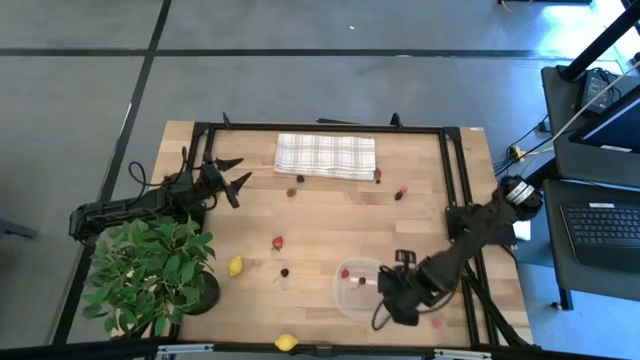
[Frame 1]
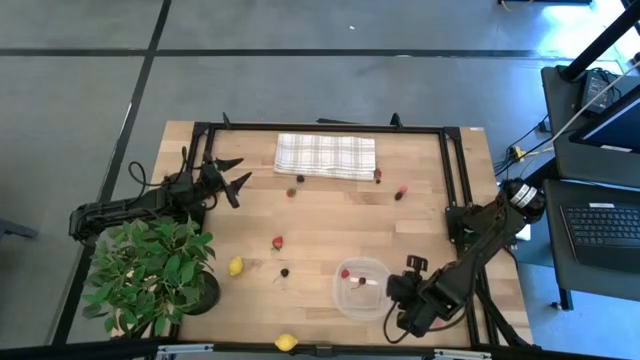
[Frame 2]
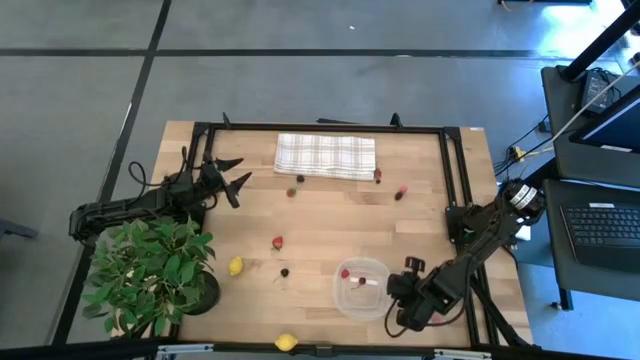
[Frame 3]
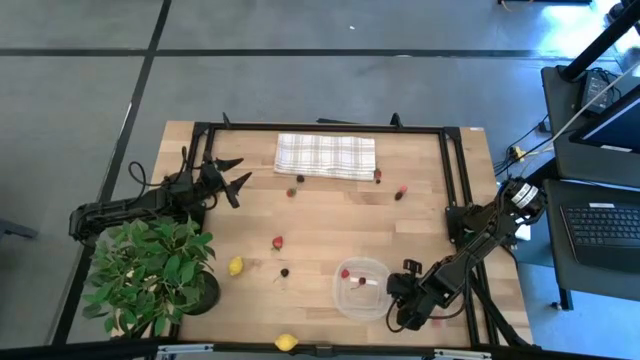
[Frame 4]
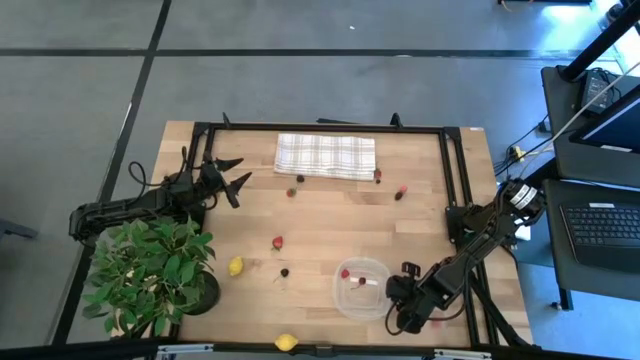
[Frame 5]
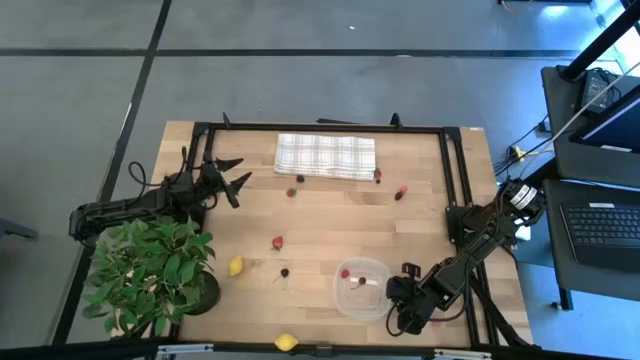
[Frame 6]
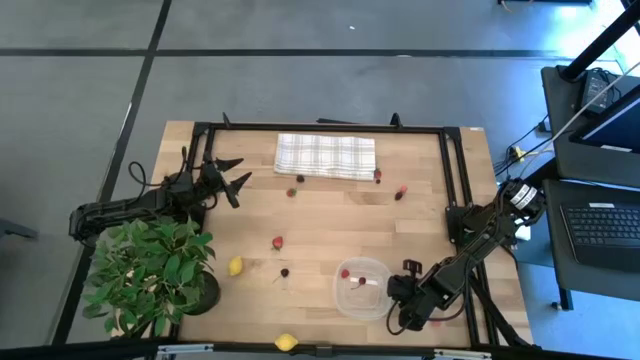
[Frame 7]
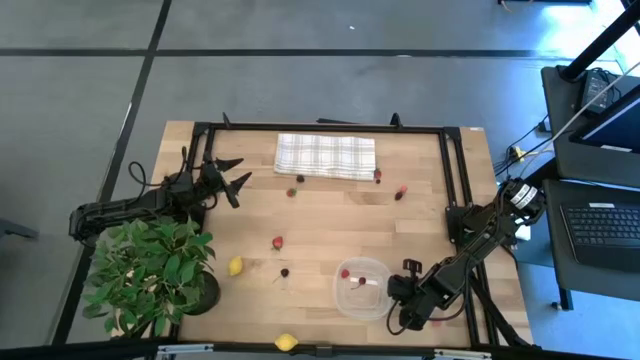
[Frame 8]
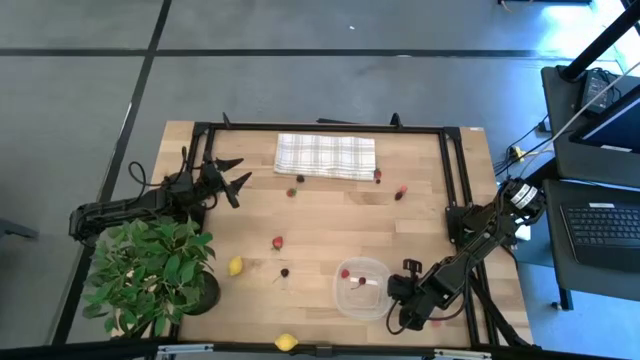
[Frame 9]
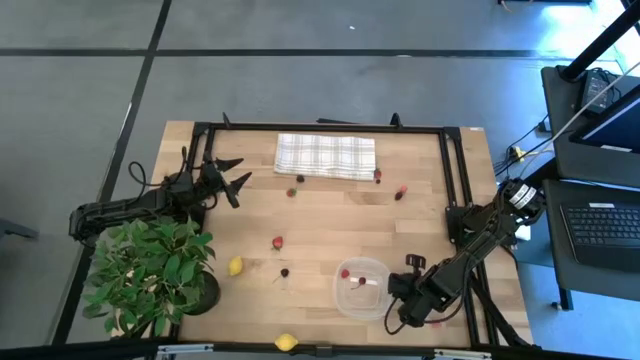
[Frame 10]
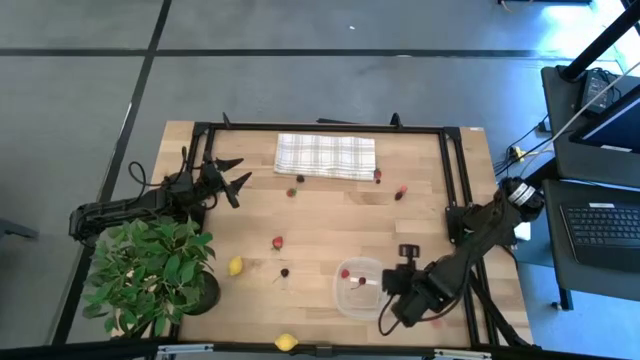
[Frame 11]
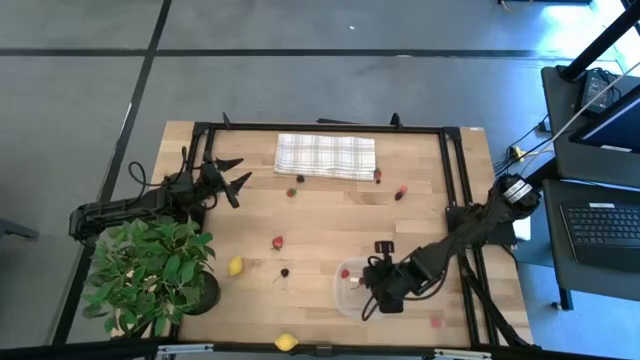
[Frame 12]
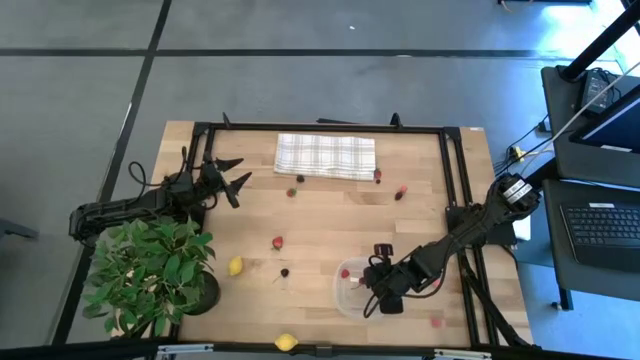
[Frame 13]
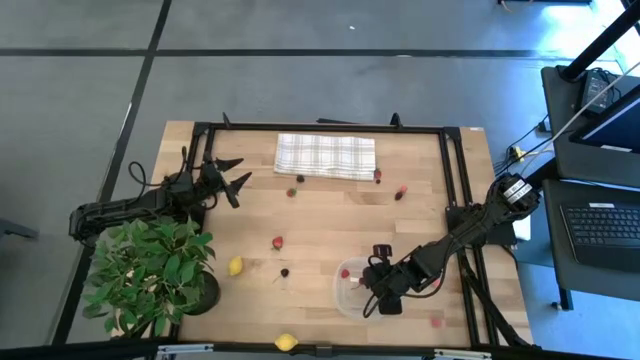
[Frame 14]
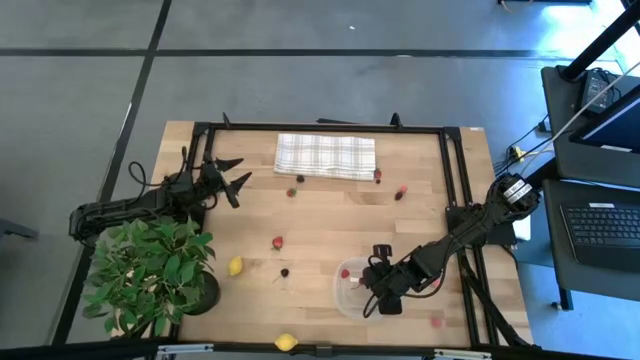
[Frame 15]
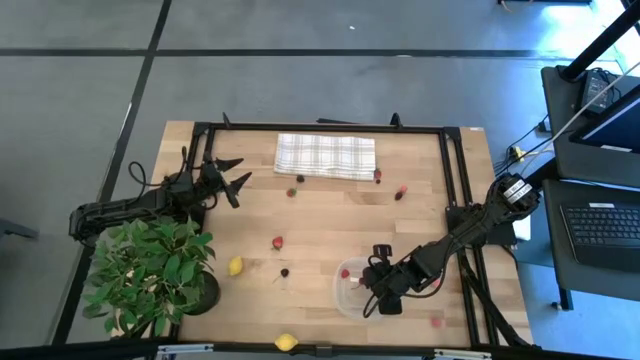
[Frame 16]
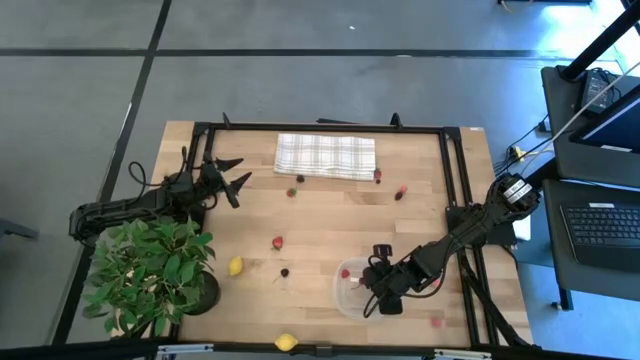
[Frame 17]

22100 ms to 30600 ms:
Task: Pick and placing Produce into tupperware
Put the bottom dark purple blueberry into the transparent bin

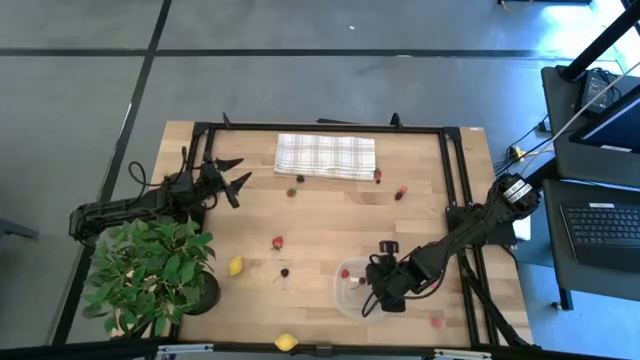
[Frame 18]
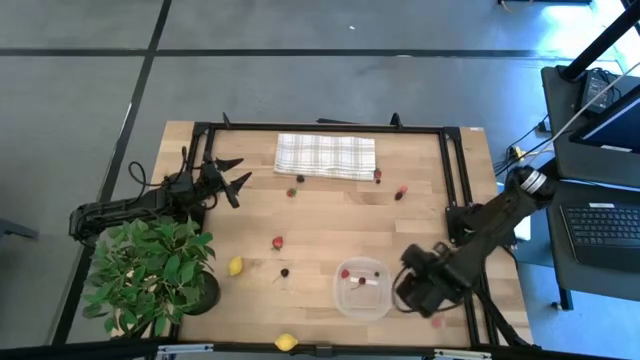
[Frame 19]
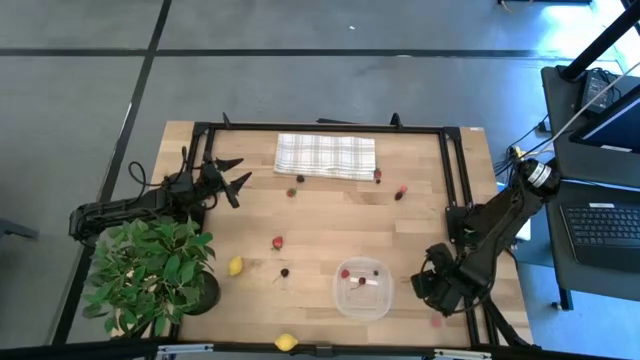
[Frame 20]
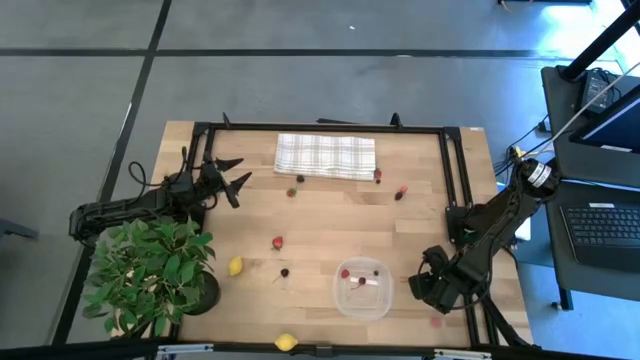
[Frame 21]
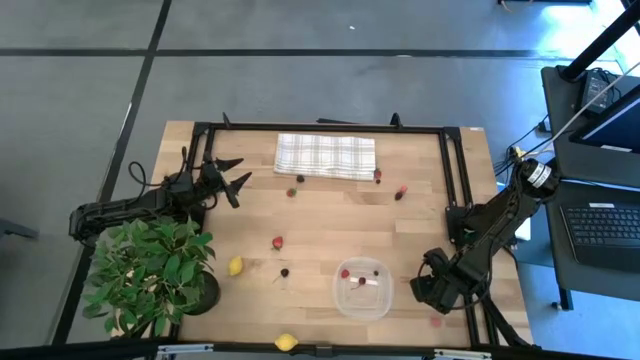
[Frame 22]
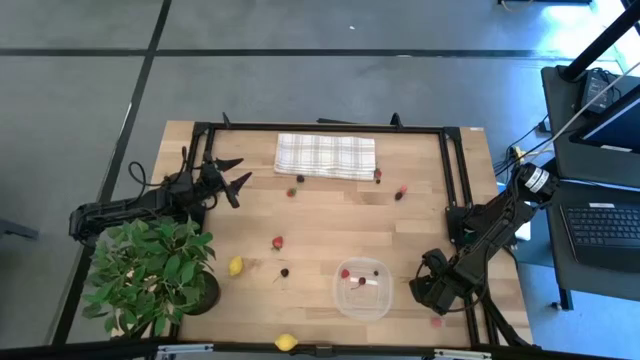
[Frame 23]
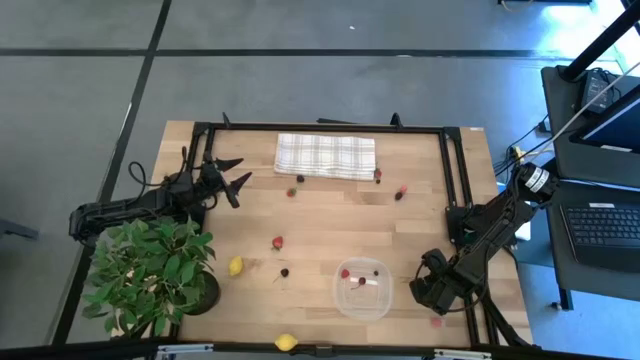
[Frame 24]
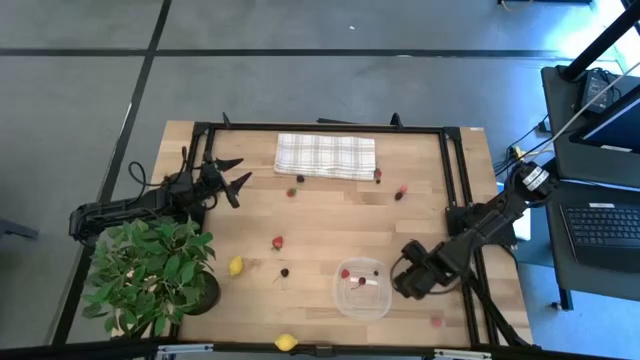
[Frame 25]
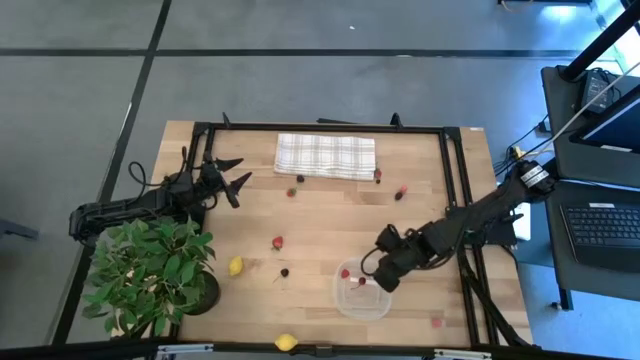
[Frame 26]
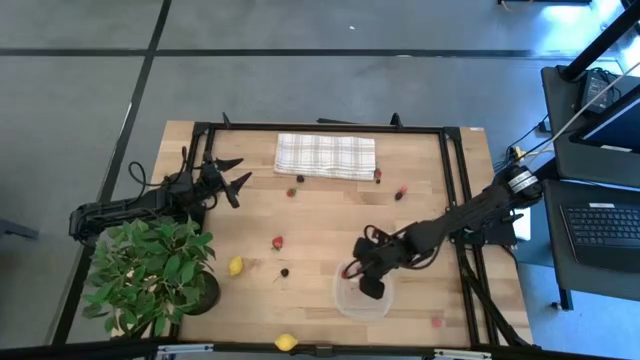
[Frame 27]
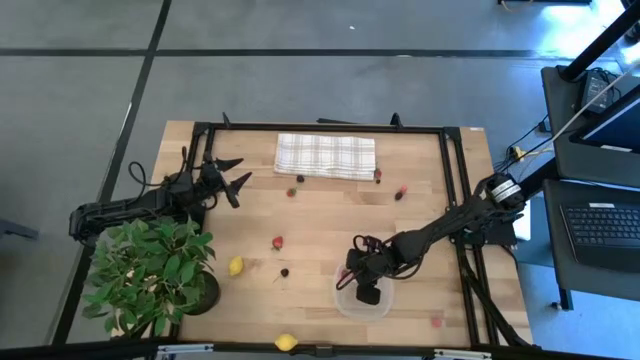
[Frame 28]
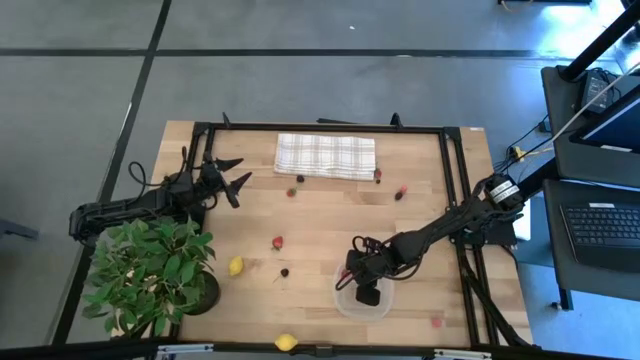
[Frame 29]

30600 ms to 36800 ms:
Put the middle pink peach into the transparent bin

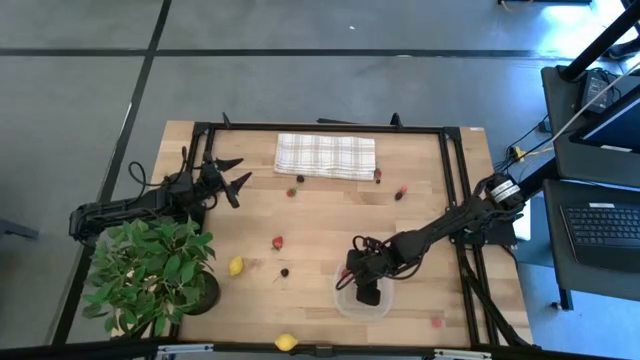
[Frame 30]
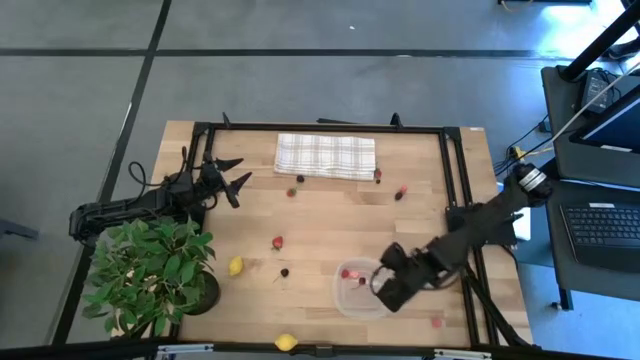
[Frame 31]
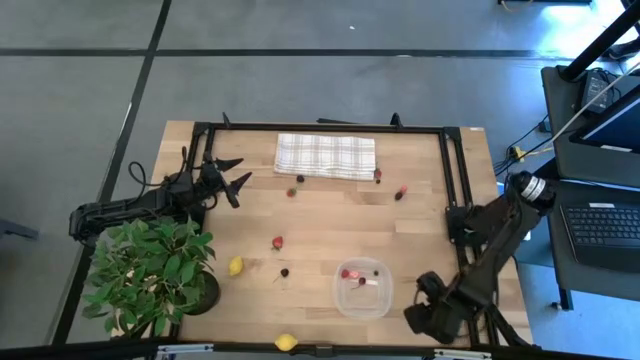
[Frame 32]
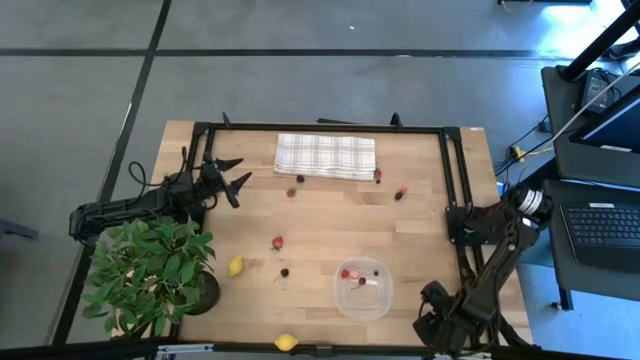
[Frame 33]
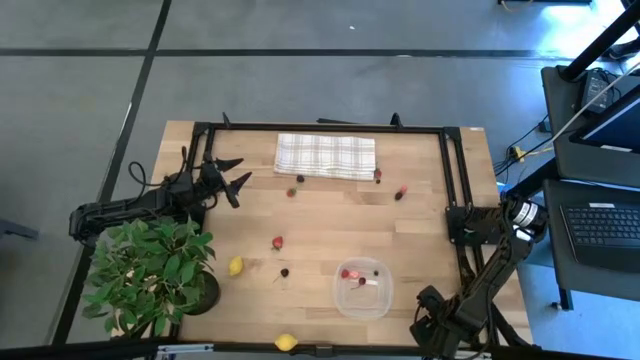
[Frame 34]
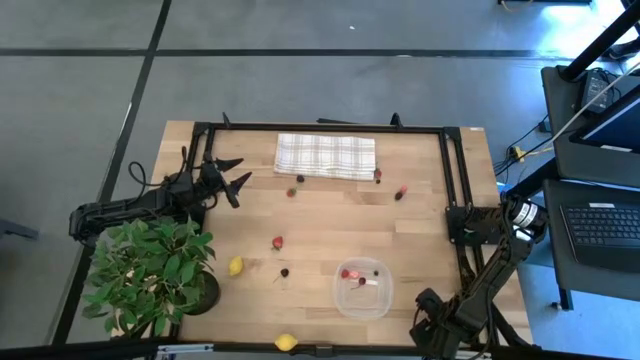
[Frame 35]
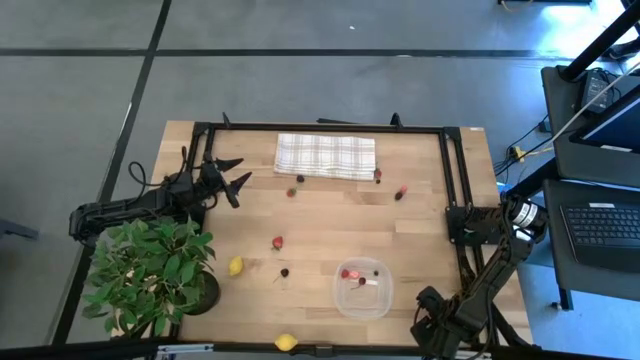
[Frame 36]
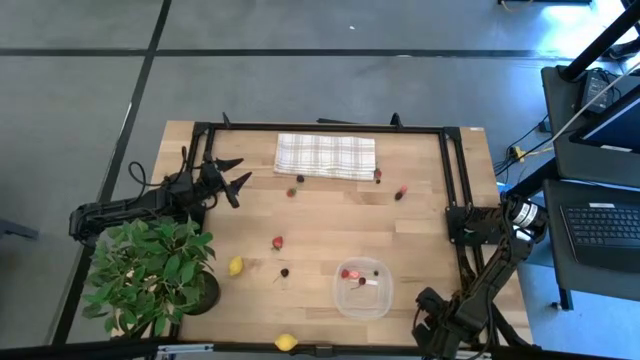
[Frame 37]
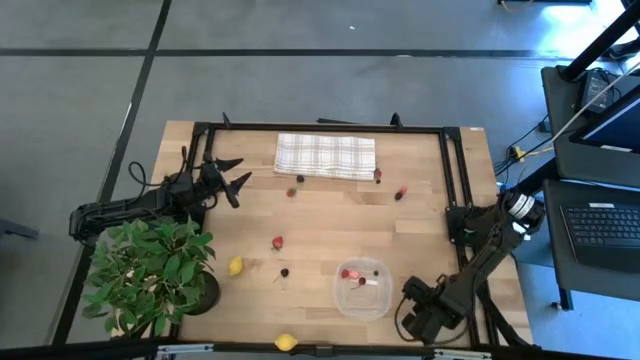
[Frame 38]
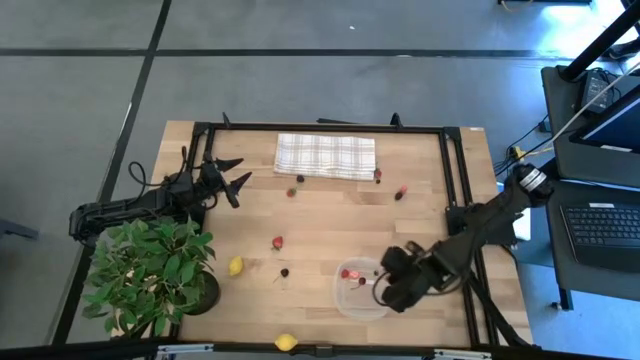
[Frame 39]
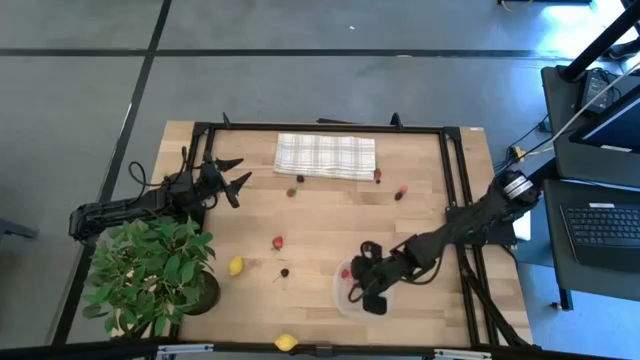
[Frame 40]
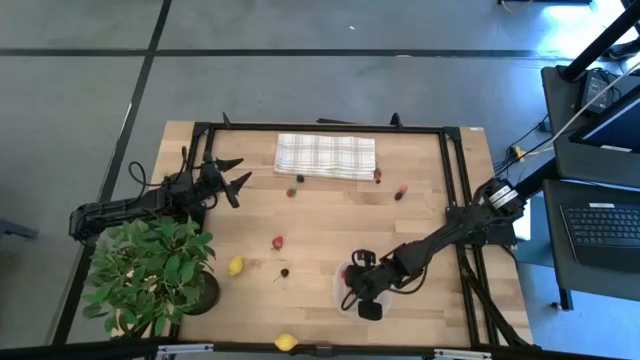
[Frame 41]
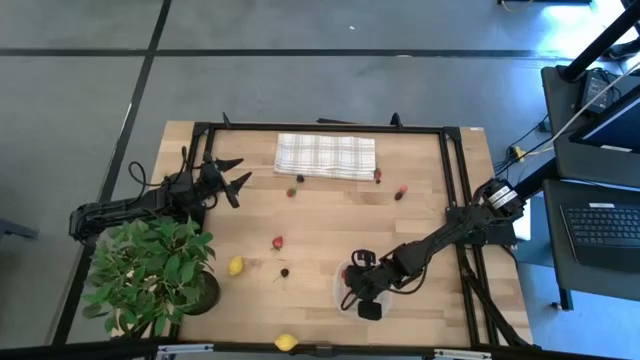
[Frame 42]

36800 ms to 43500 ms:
Put the bottom pink peach into the transparent bin
